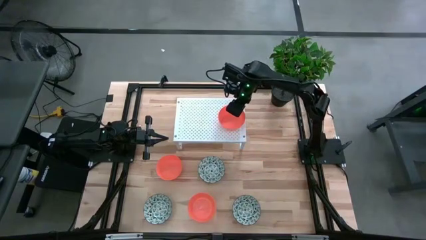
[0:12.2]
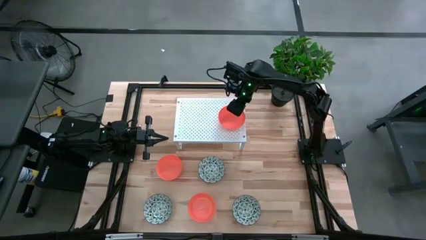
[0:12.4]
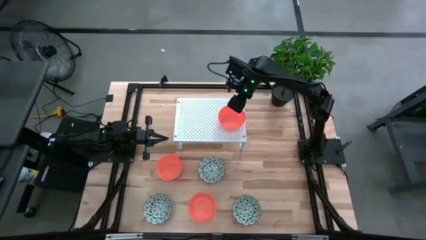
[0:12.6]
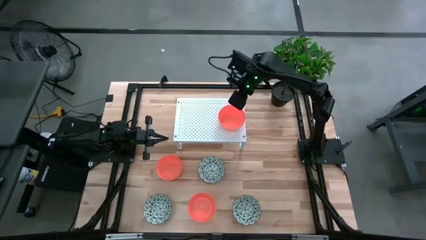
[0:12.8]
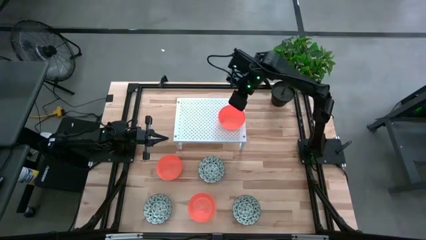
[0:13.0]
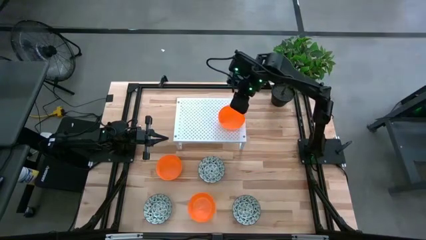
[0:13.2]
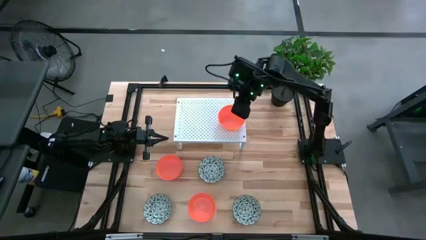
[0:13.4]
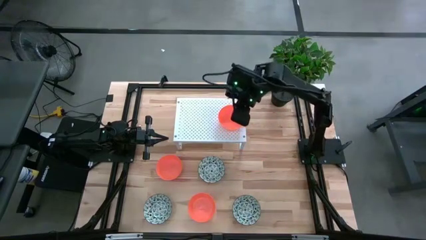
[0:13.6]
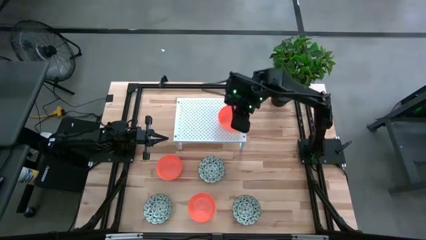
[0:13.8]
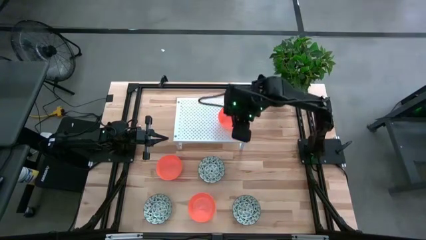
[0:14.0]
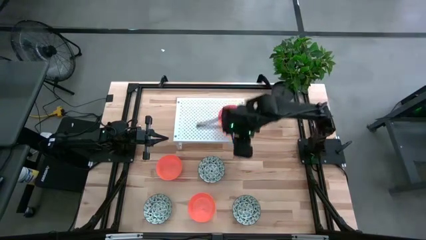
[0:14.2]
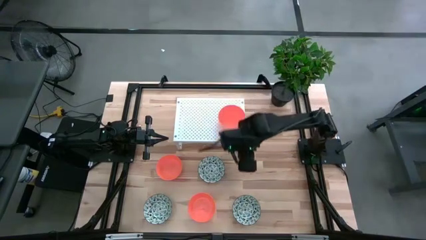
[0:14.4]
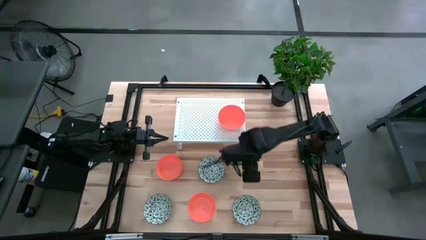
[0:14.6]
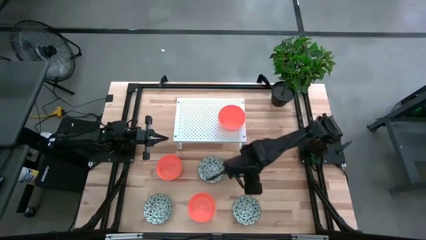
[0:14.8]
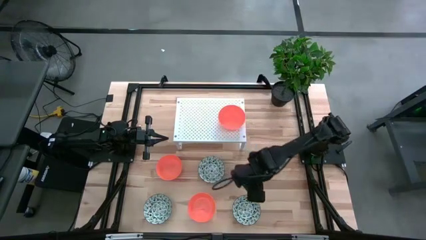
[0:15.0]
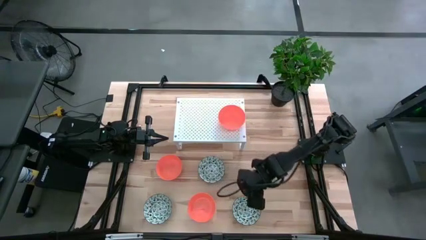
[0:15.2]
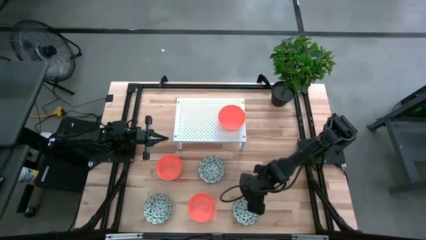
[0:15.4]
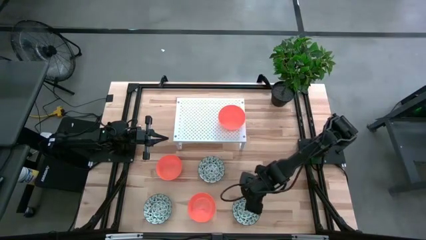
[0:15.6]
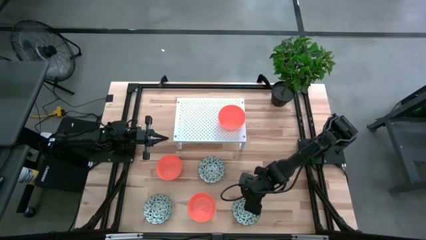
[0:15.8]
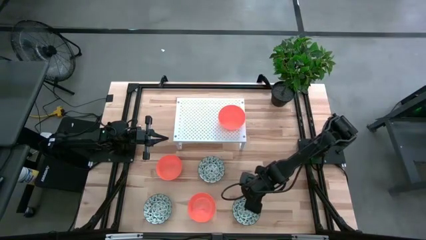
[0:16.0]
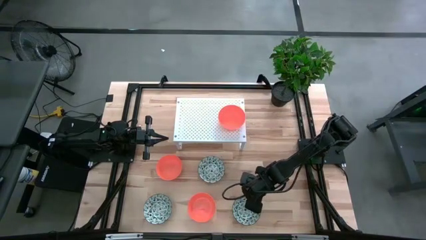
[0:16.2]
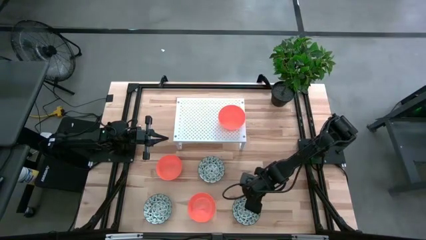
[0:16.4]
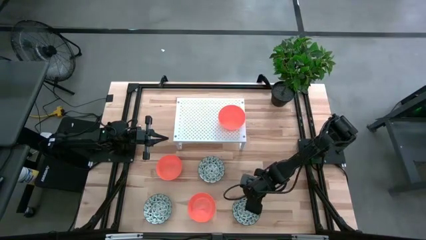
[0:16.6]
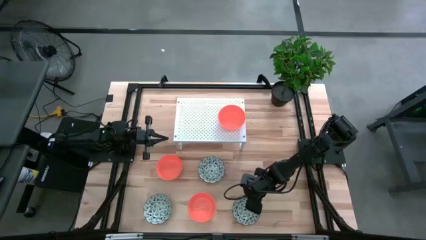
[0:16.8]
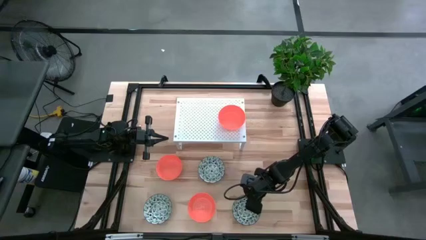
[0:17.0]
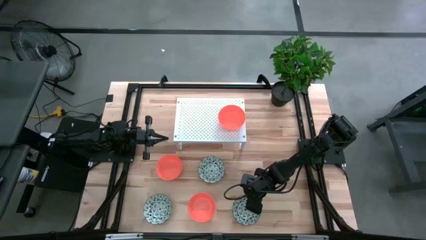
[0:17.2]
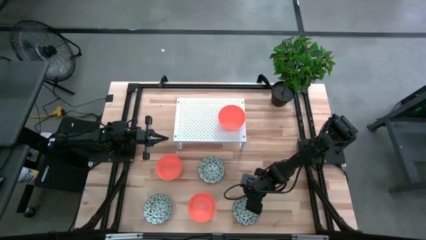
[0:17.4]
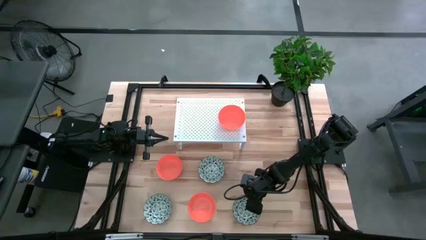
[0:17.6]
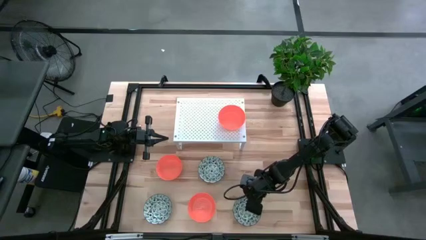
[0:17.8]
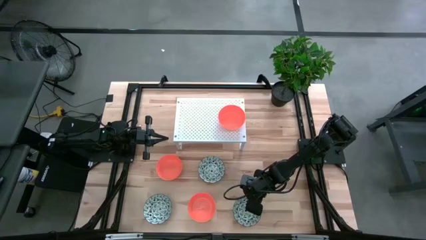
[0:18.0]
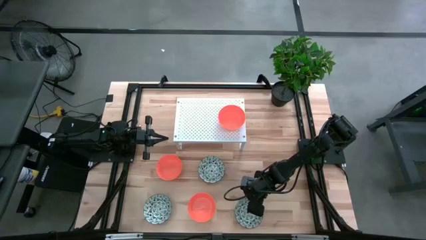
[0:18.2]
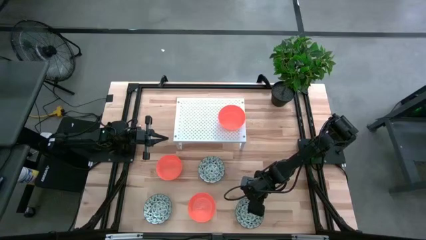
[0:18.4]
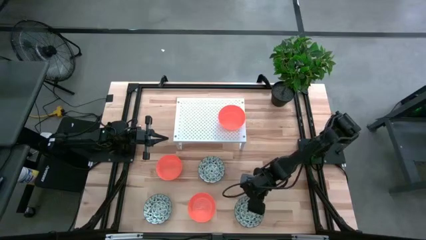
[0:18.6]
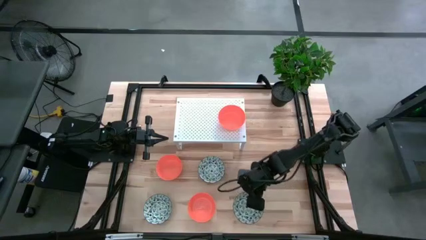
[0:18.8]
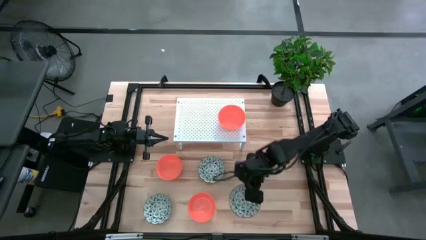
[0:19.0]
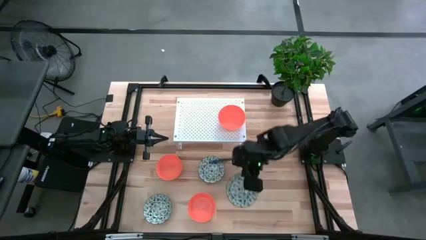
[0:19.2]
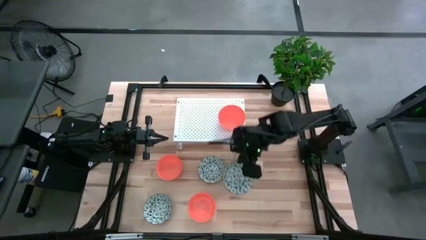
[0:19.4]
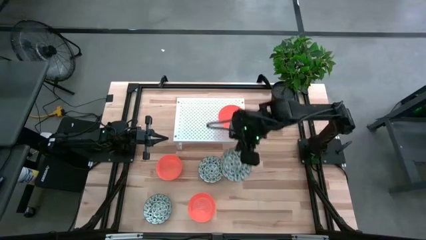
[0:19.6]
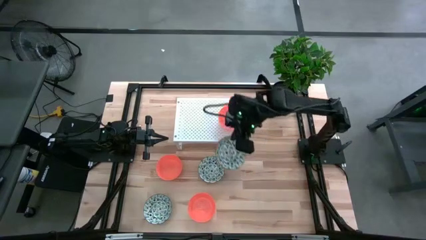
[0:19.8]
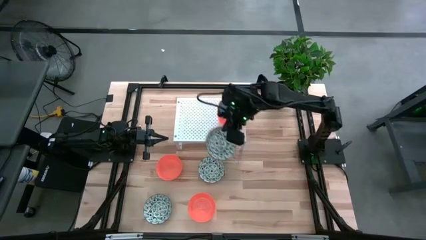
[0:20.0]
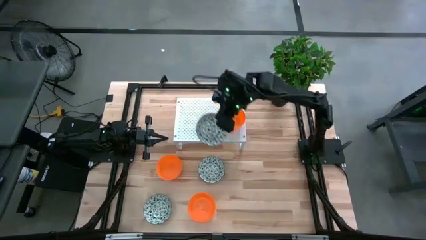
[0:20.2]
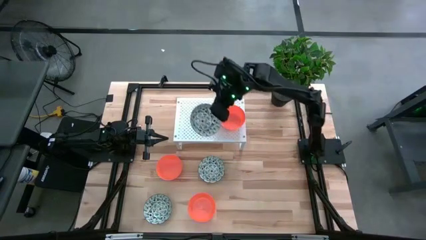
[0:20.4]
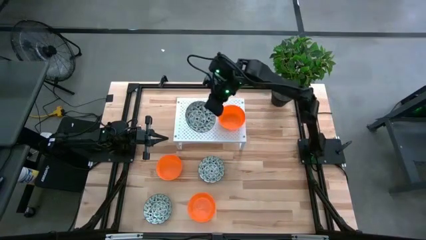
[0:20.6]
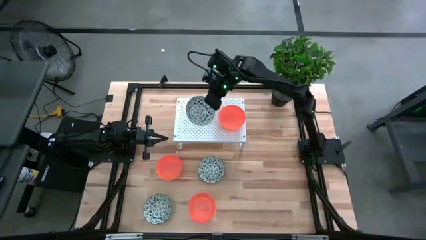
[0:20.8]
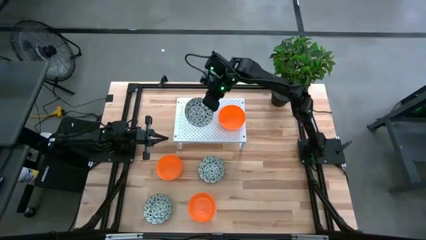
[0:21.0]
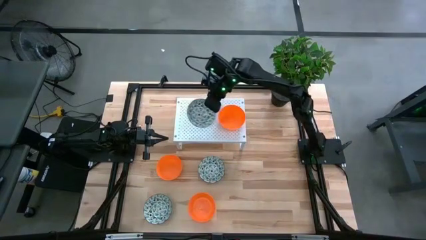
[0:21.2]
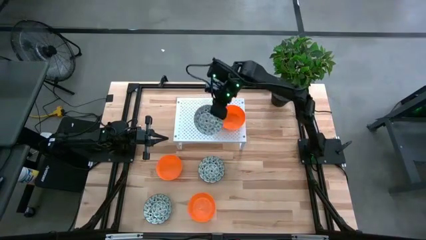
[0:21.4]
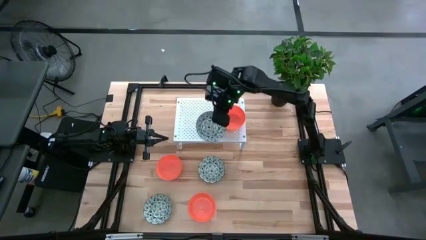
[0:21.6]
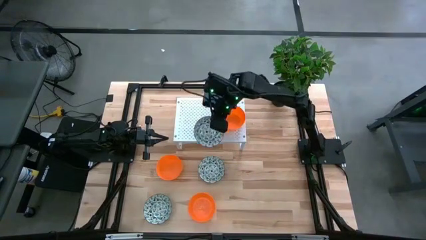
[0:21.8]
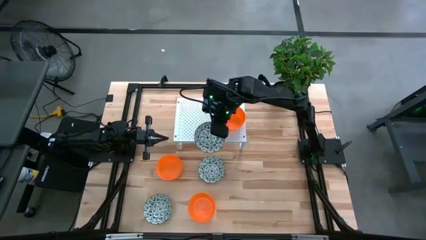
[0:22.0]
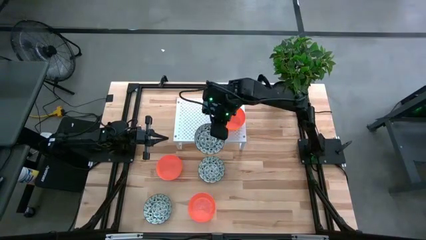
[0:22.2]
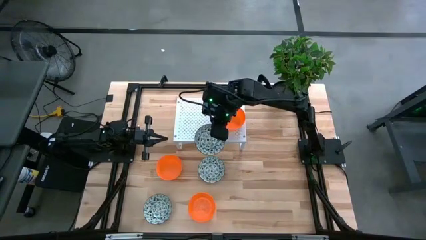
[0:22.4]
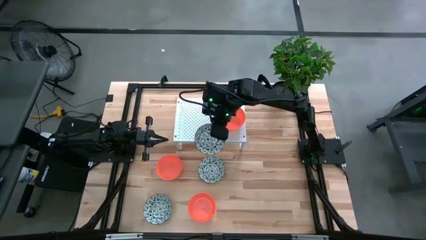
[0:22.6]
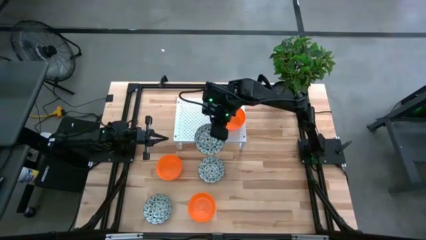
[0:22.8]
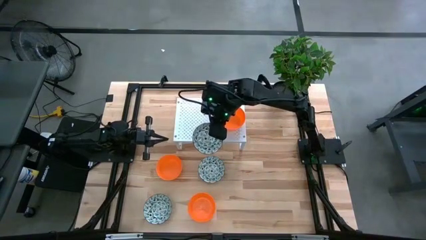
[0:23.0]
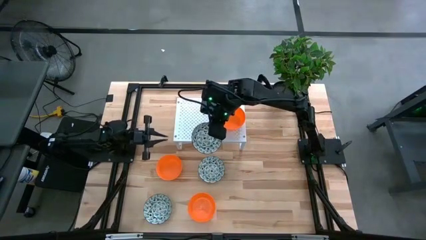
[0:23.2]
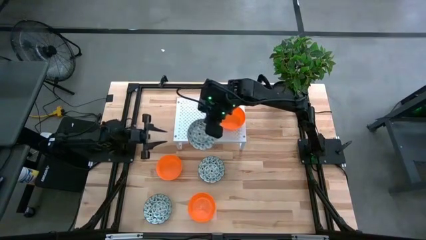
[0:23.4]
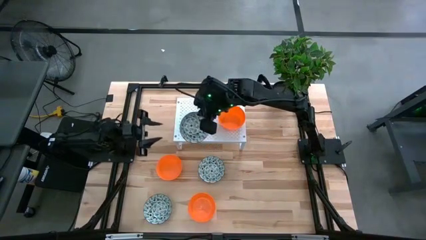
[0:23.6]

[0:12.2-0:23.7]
Task: Pick & Place Mini bowls
Put the bottom right green and white patterned bowl on the shelf

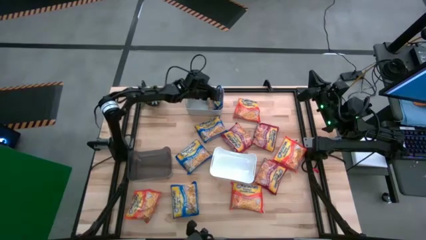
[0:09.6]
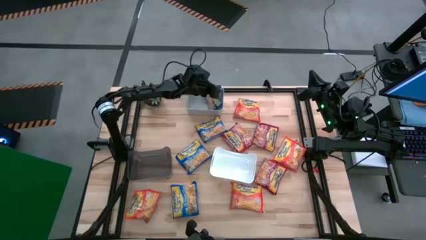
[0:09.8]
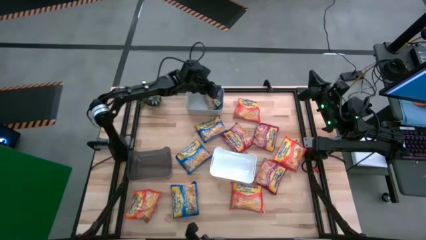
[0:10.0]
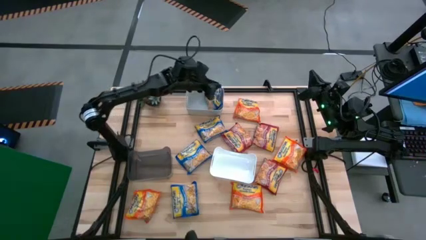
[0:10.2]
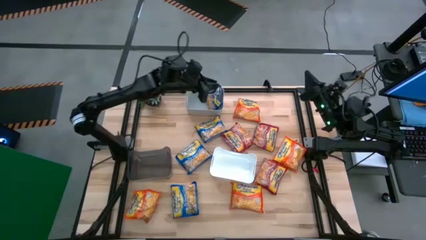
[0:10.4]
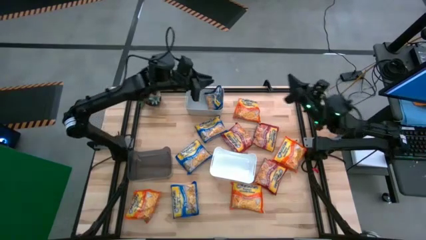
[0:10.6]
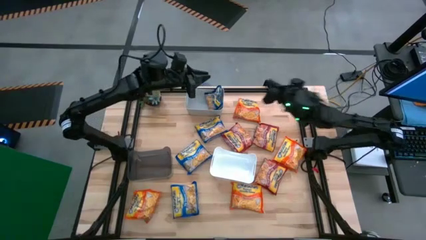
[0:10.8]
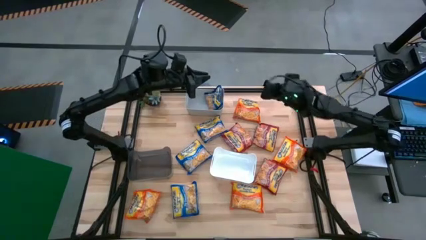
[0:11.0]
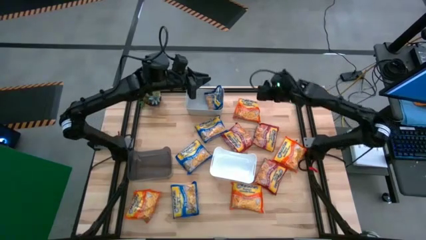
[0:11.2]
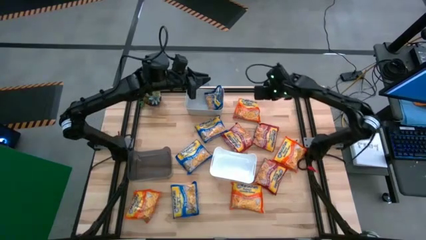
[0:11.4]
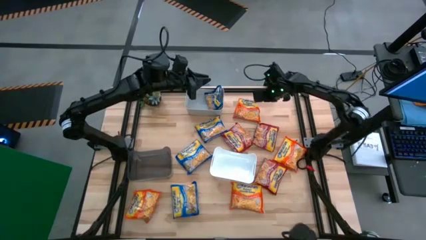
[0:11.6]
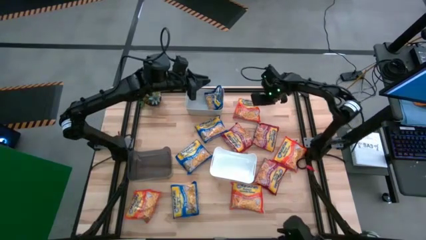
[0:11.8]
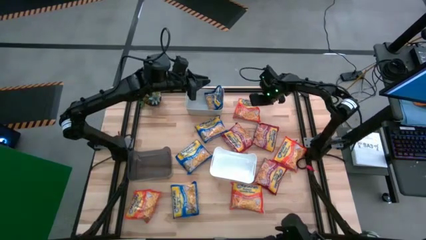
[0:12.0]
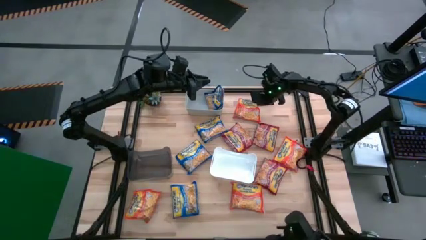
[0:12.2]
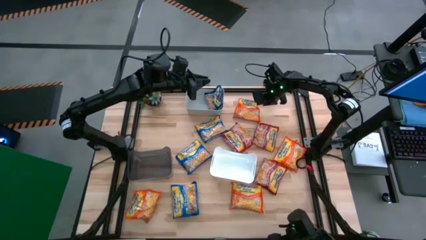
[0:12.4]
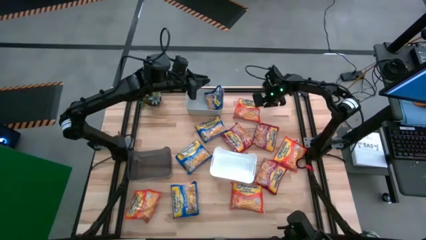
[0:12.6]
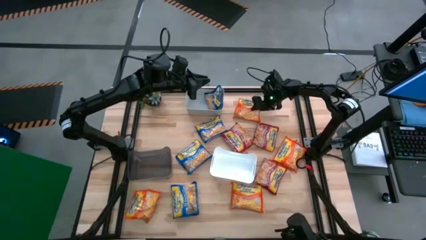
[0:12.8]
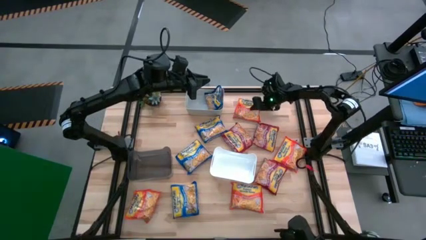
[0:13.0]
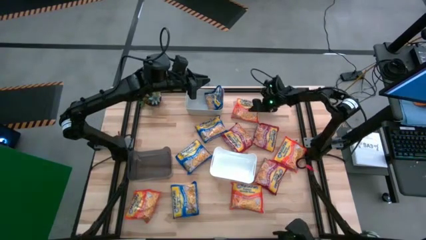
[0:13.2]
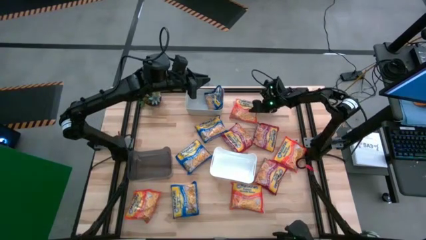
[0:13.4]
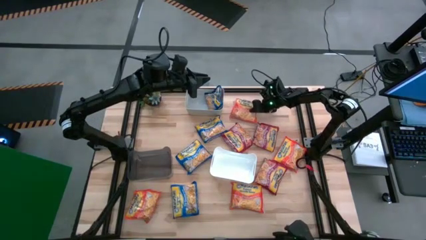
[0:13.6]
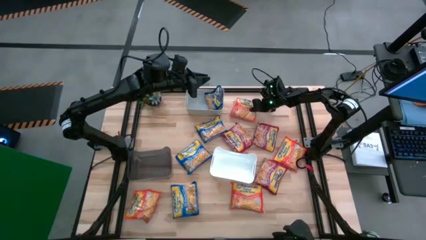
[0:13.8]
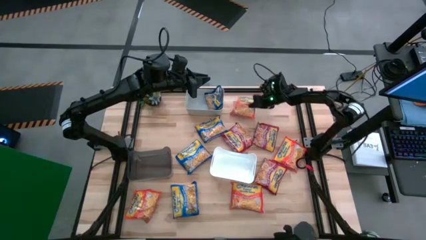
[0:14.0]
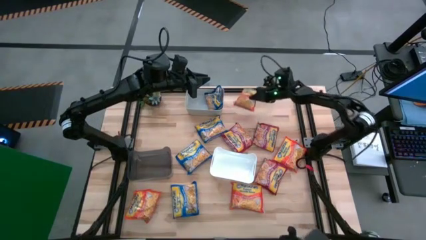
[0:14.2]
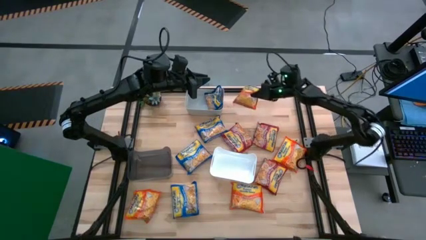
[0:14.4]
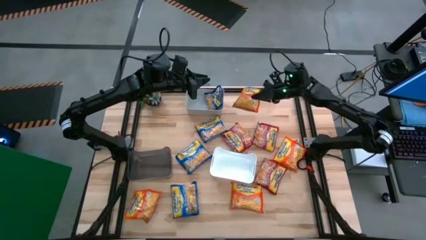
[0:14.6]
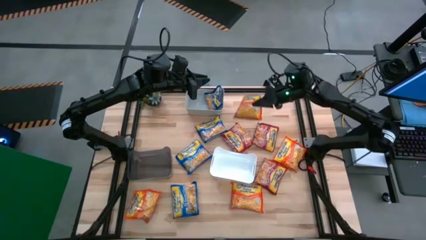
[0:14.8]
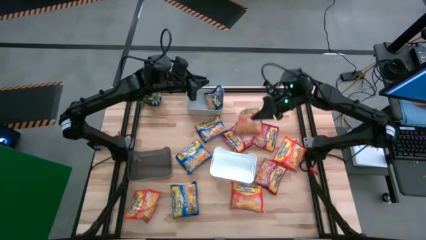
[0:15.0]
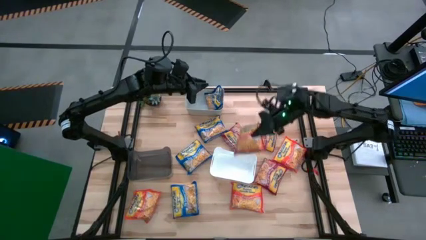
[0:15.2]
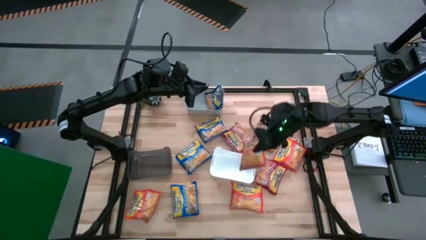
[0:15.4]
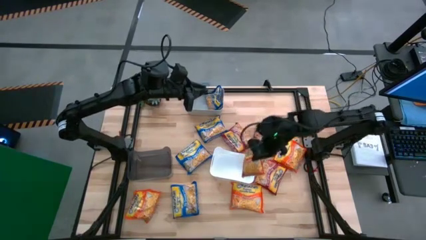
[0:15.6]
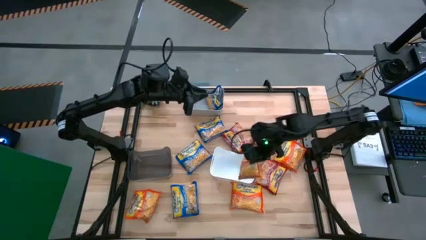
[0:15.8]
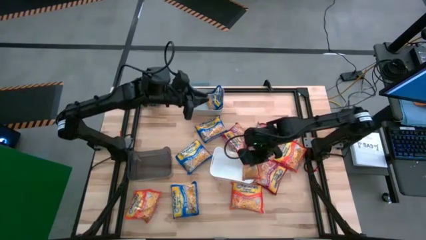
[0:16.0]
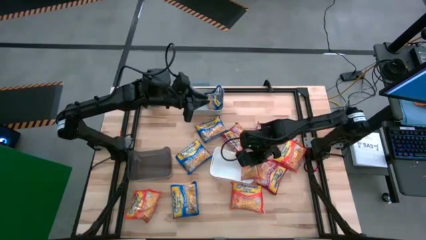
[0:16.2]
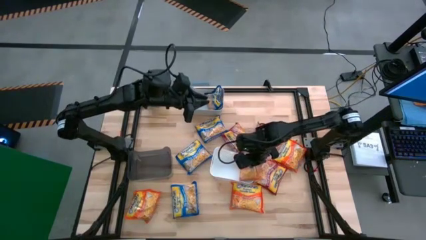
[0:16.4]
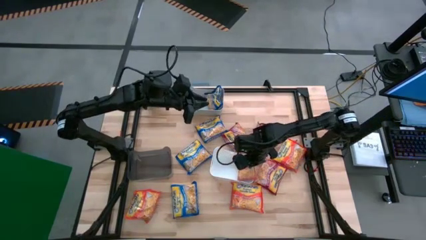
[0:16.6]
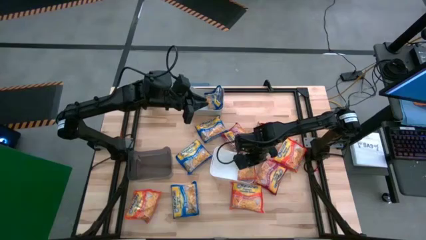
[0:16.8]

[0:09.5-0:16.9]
Task: Sort Maruchan noodles
Put the orange noodle pack into the white bin
